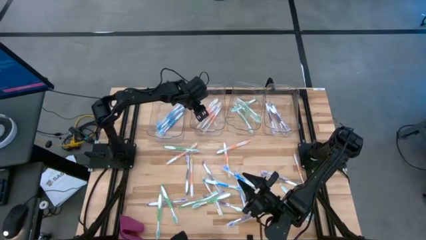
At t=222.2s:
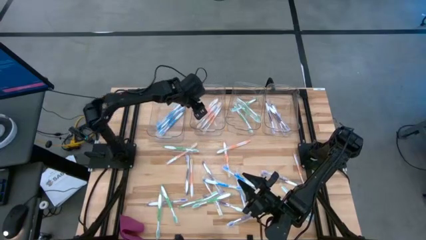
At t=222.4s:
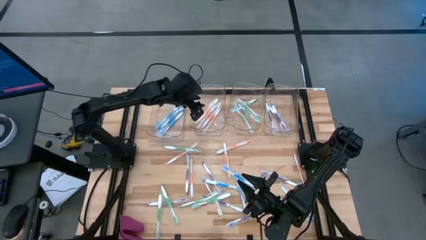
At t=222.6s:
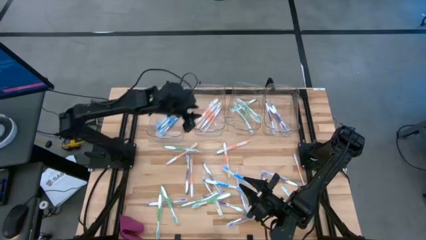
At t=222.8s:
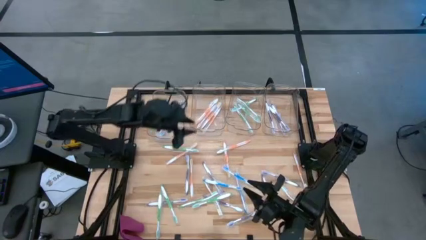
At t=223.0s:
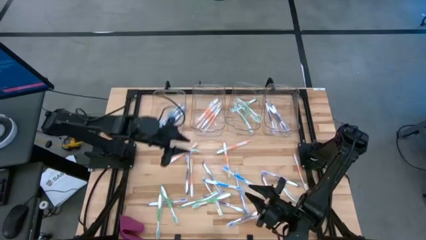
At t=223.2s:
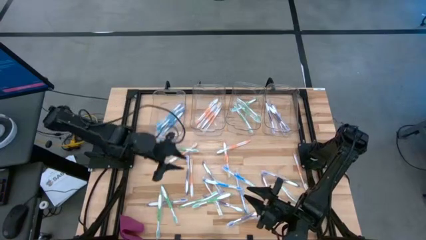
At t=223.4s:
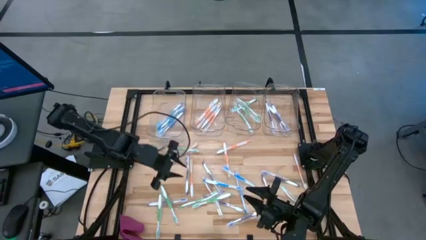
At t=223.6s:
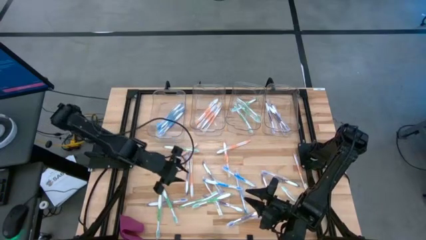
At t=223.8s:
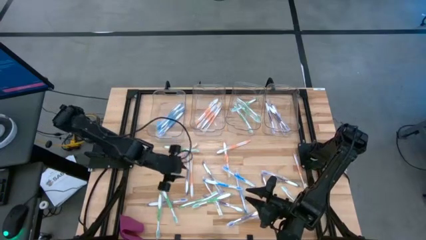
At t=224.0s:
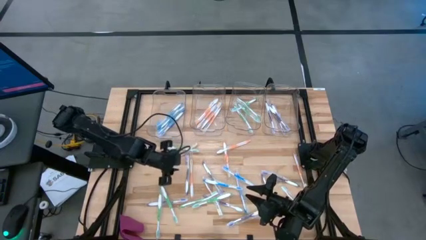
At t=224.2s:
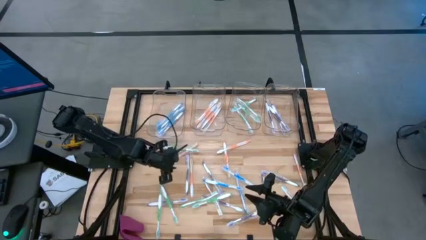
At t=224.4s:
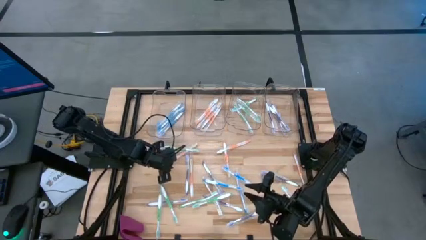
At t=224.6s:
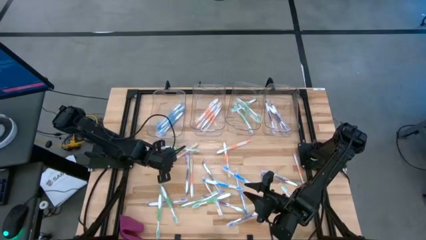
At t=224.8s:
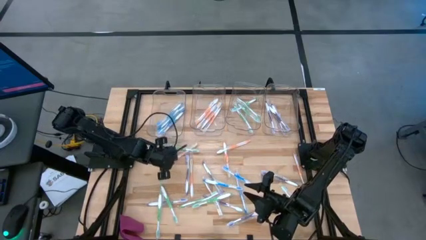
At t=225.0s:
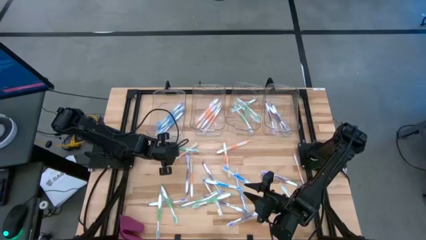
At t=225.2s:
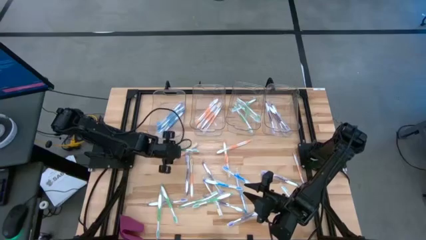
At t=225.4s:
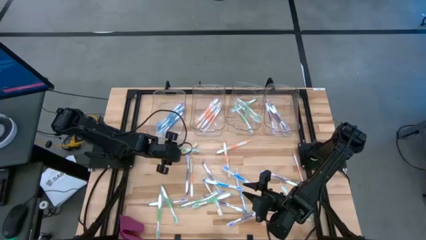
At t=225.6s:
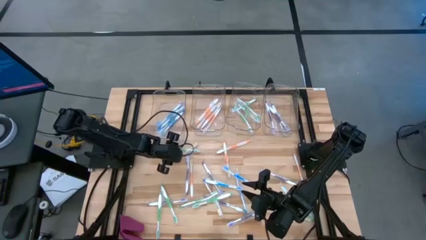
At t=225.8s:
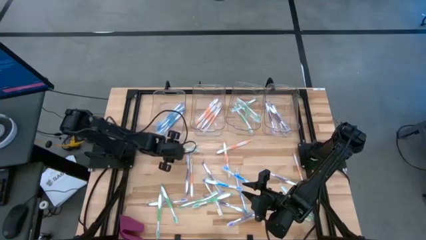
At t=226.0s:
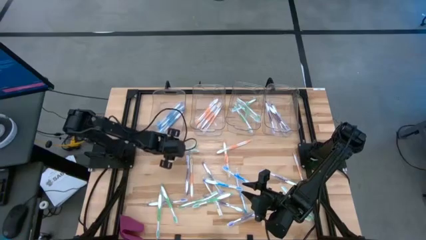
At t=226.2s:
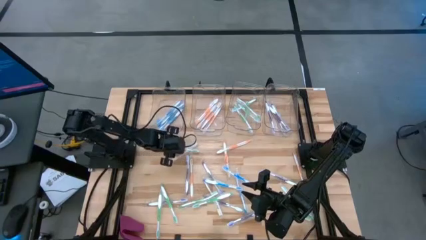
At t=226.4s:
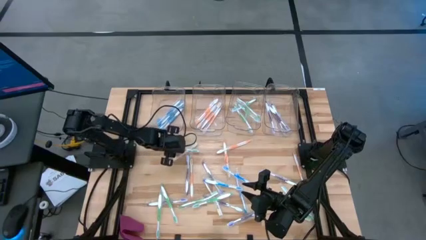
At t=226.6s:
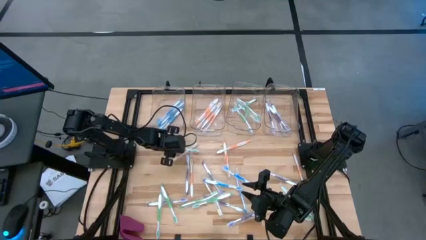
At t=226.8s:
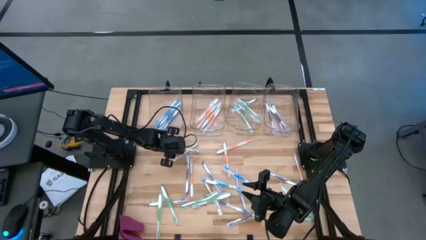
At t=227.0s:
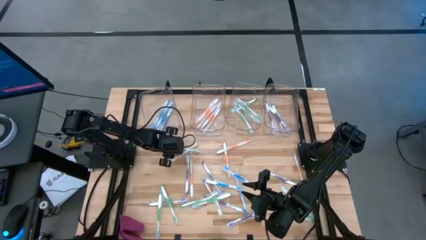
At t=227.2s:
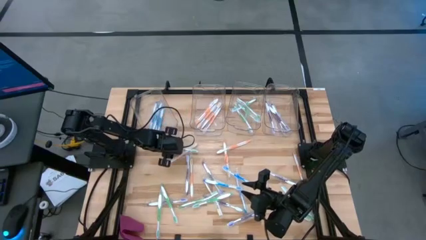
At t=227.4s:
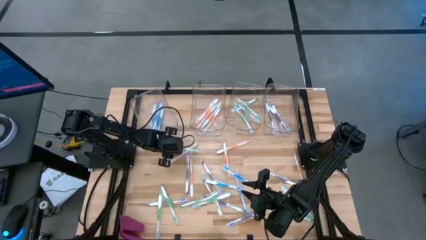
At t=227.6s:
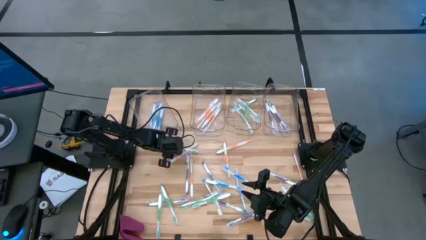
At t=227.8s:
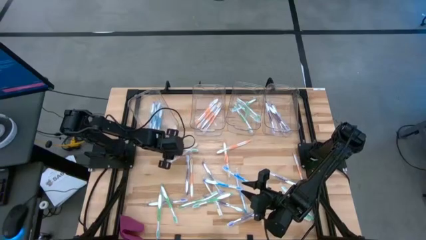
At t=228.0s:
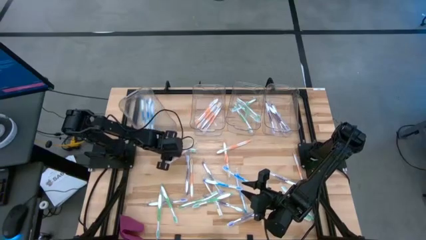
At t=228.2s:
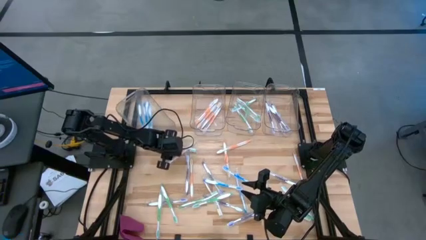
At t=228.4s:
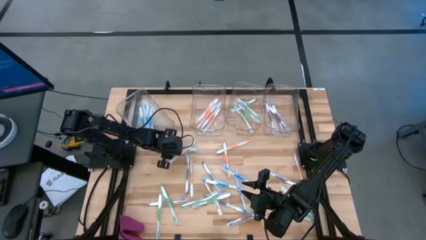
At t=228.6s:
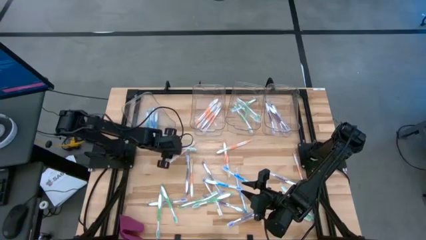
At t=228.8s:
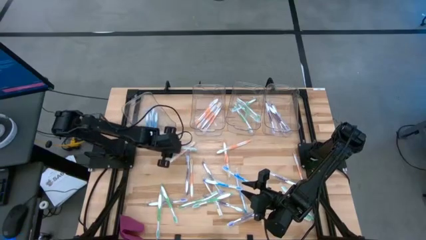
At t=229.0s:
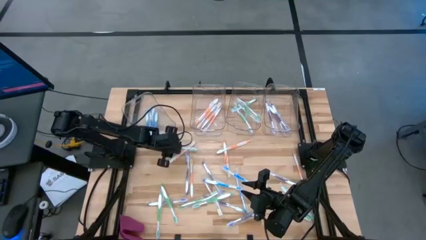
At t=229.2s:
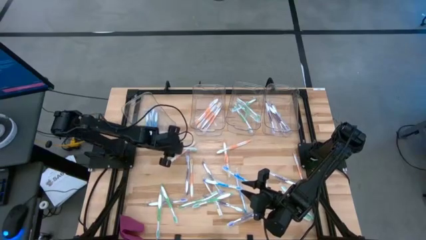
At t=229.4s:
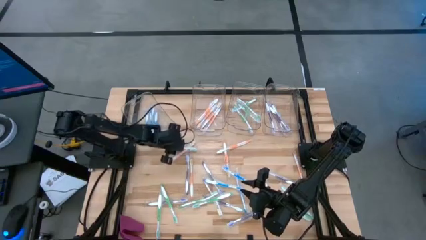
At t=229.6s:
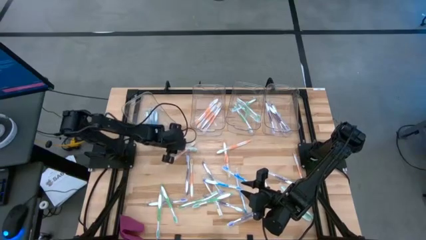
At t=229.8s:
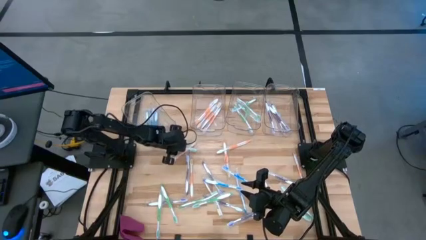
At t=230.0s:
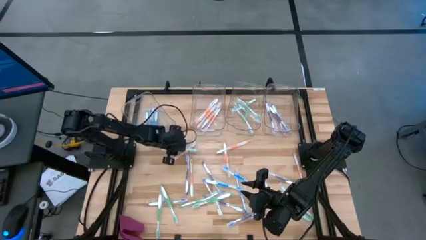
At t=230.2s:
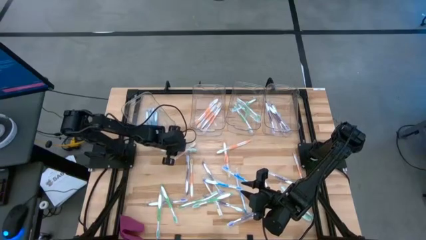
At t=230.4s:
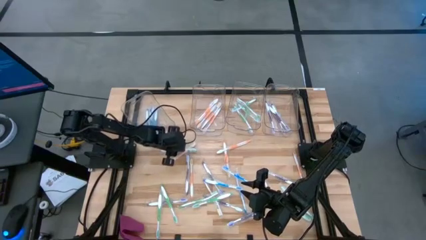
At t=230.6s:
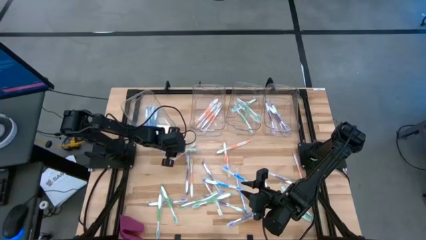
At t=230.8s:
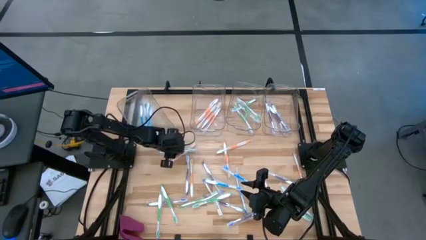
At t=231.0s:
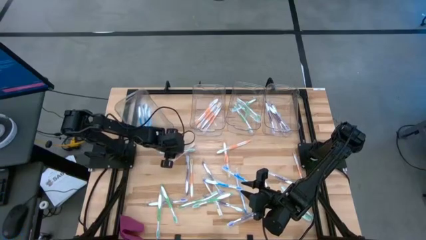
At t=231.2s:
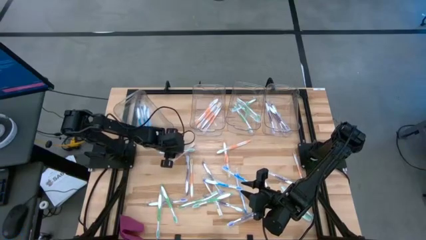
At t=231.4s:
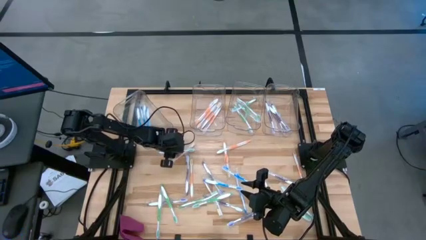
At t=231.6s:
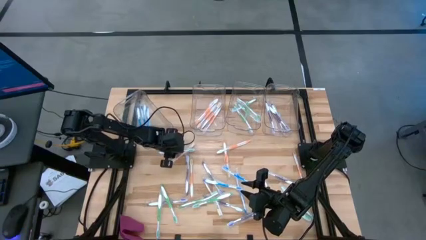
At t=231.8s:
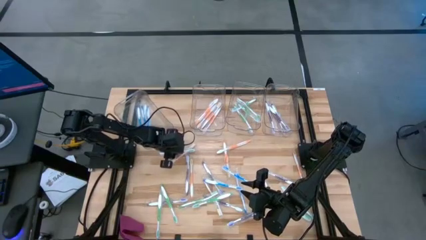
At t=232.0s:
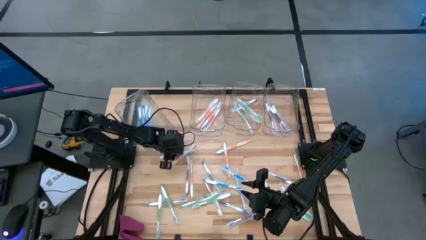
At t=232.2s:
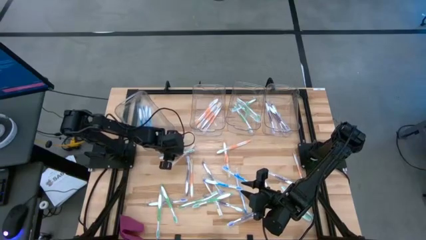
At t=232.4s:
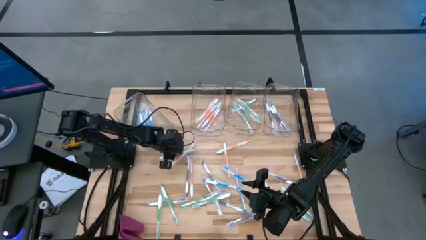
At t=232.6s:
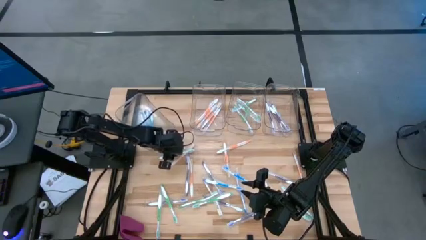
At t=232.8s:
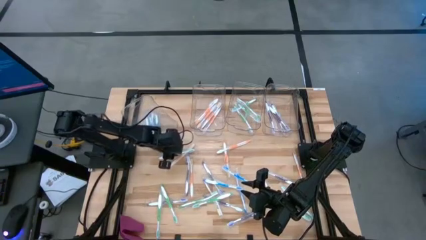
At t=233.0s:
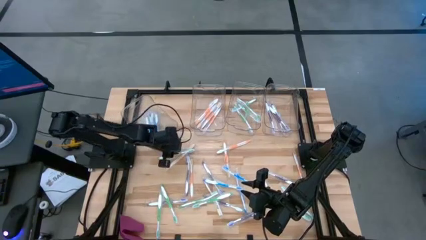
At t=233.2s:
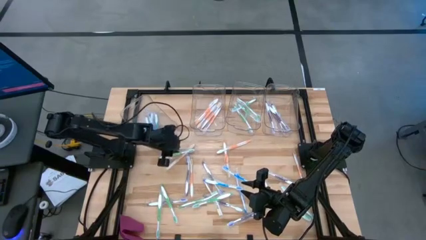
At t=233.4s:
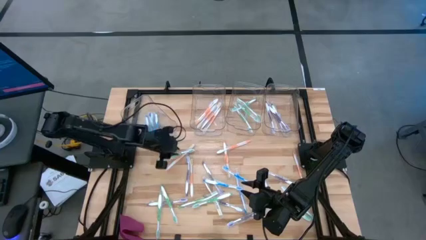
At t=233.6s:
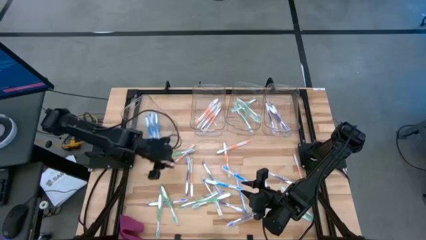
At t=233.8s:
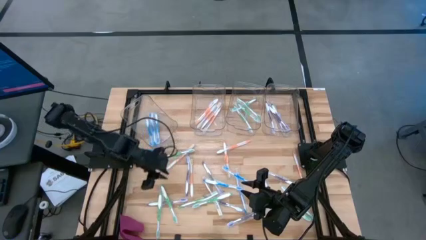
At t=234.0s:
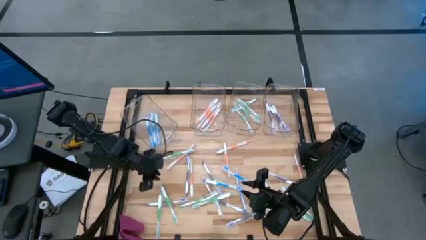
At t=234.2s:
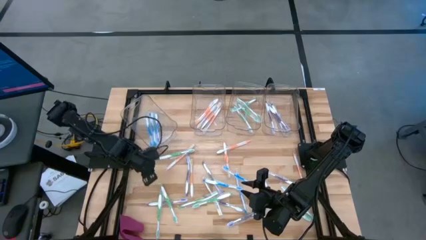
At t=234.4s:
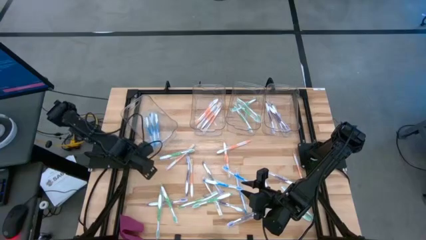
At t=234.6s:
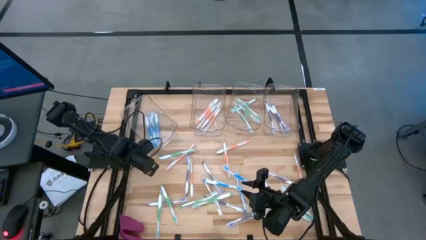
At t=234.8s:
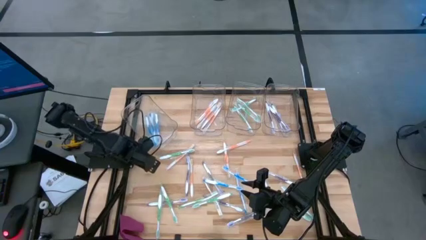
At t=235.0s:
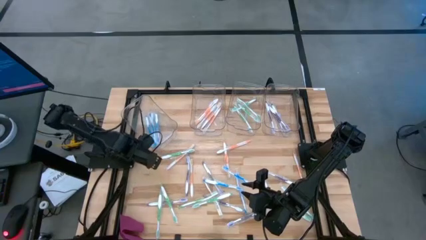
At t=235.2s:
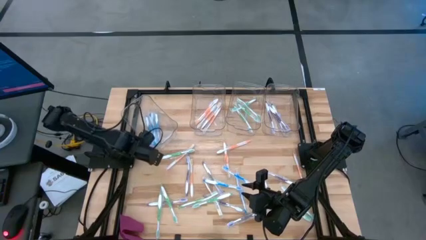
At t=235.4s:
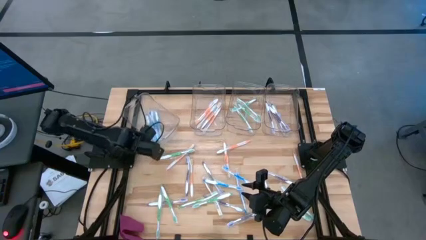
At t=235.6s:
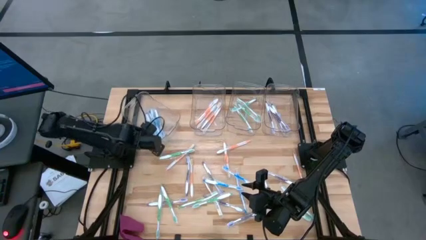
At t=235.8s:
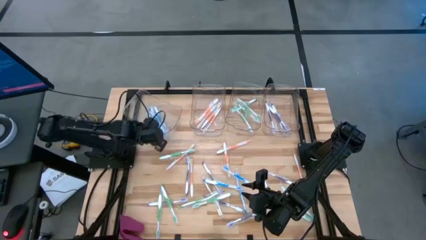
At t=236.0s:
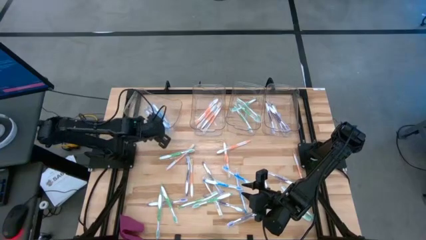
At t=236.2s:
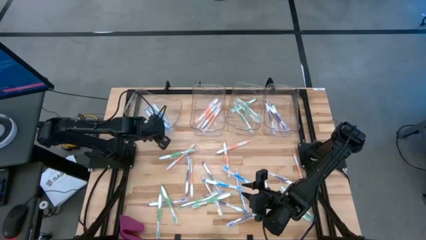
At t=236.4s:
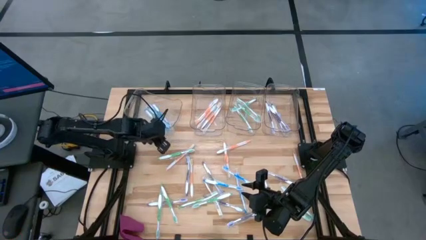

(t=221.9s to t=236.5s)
Task: Pick & Place Toothbrushes
Adjust the left transparent bin

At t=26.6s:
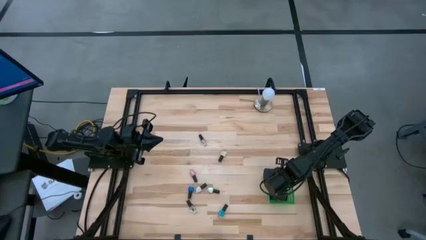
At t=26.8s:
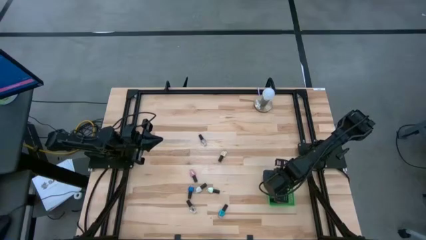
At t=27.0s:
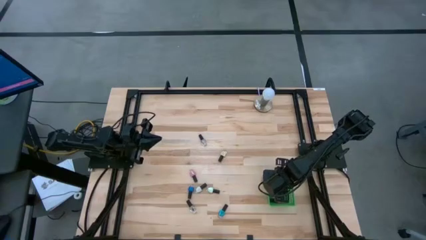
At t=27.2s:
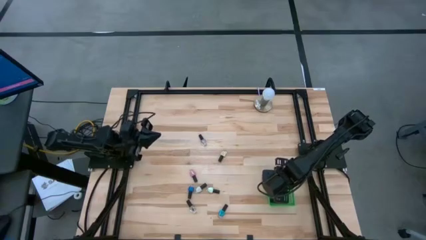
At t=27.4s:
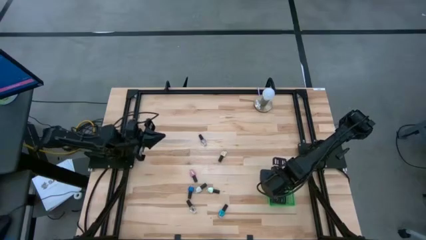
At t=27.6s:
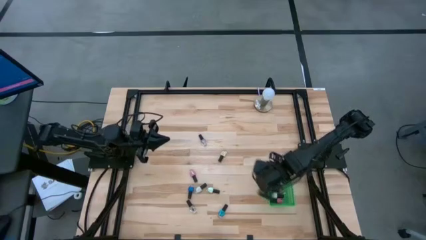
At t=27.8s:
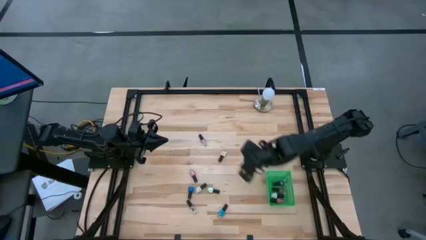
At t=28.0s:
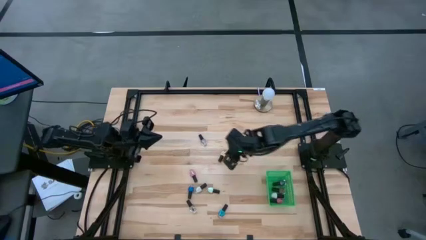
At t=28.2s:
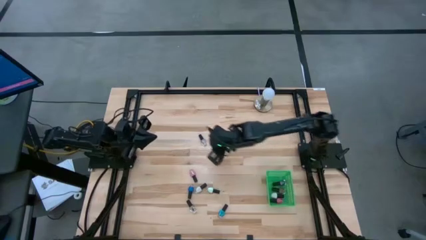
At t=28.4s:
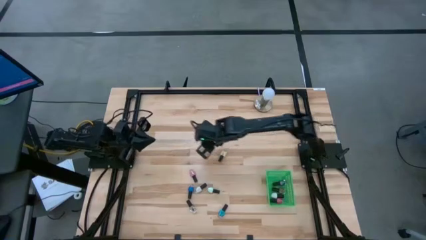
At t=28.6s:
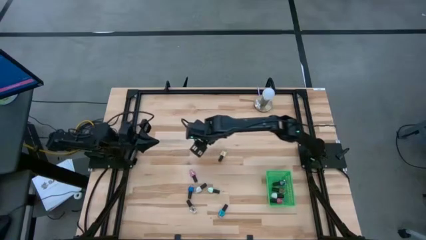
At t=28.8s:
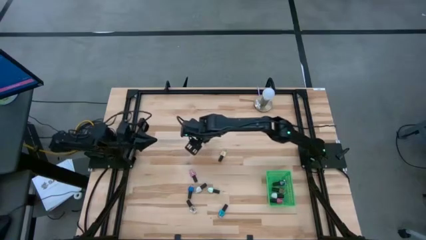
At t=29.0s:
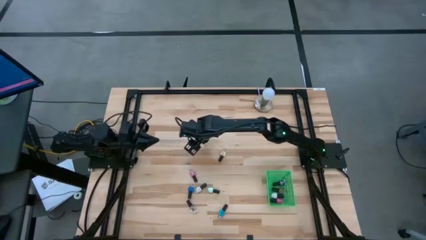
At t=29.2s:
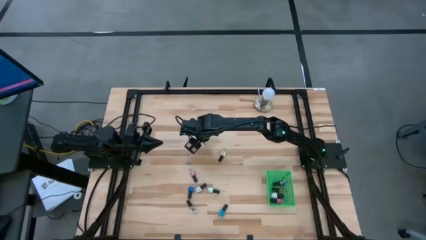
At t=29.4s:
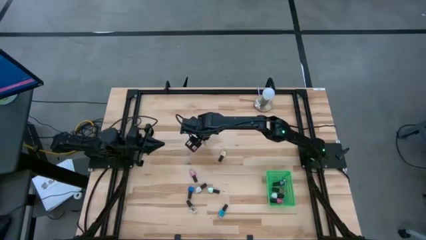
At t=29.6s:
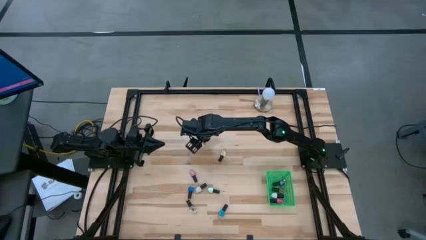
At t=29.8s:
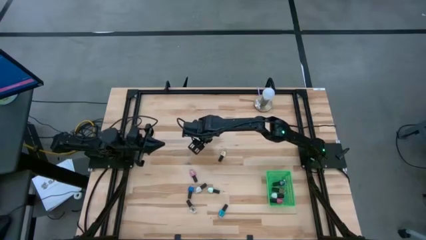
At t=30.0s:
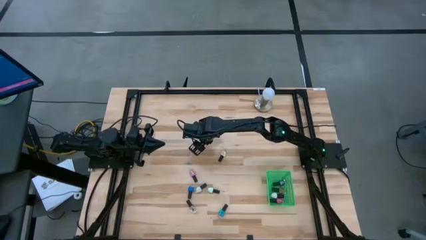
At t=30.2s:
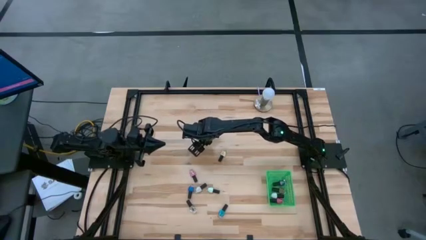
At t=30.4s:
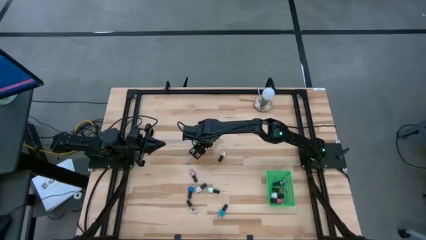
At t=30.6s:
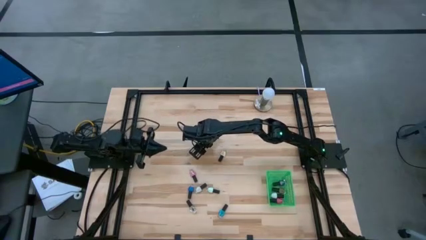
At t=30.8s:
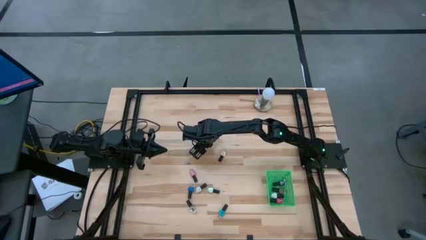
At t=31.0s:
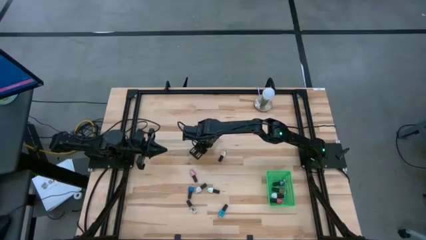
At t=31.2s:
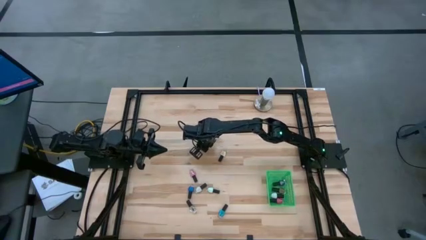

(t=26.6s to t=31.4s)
Task: Pick & Place Nail Polish
Put the top transparent nail polish into the green bin
